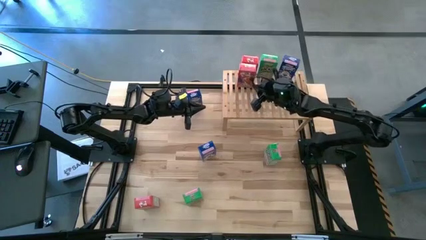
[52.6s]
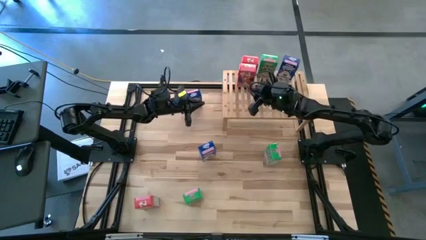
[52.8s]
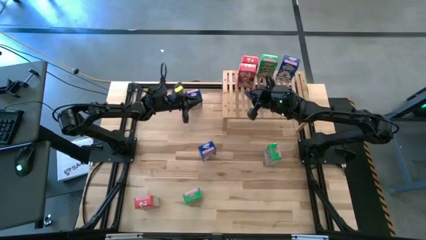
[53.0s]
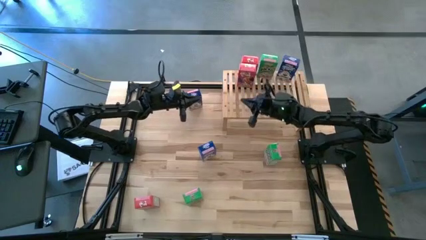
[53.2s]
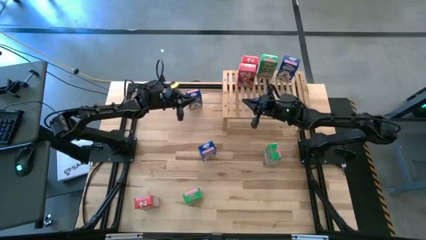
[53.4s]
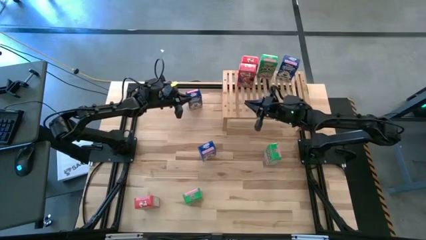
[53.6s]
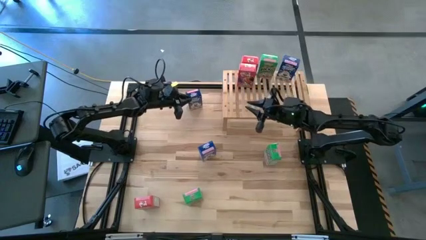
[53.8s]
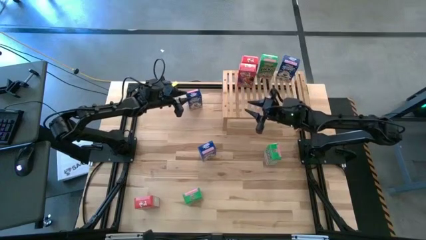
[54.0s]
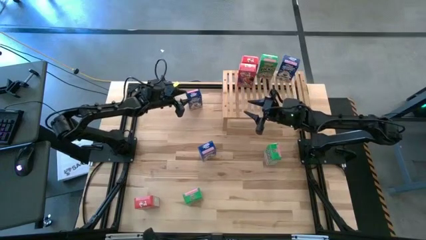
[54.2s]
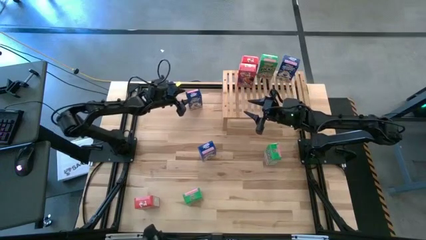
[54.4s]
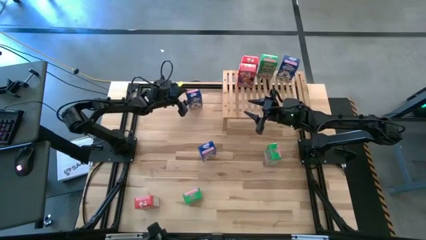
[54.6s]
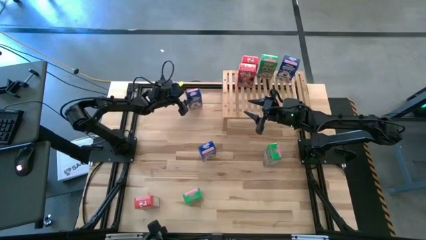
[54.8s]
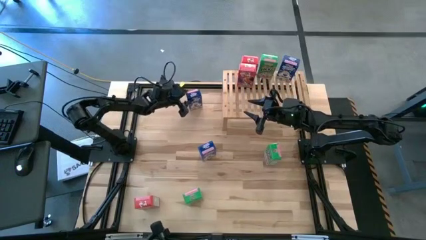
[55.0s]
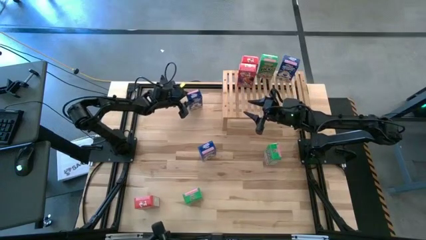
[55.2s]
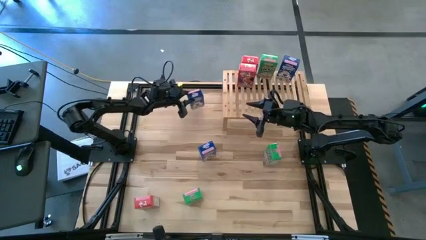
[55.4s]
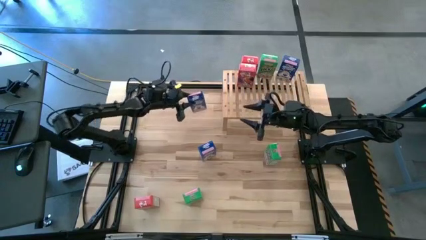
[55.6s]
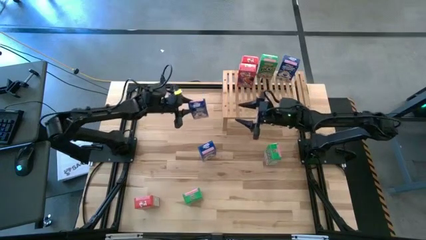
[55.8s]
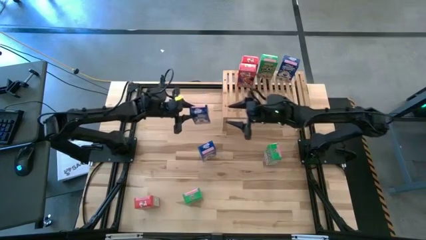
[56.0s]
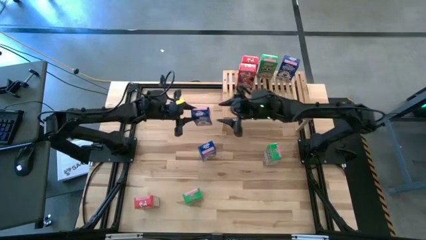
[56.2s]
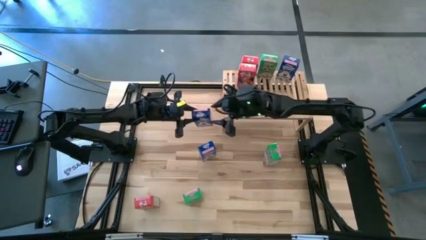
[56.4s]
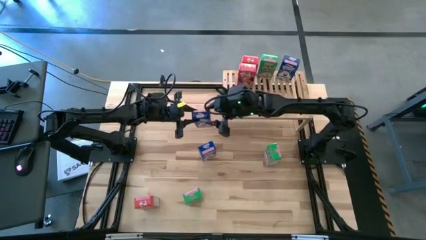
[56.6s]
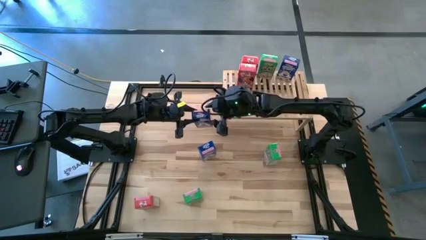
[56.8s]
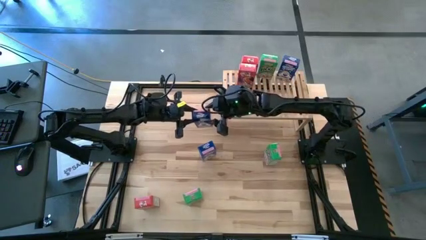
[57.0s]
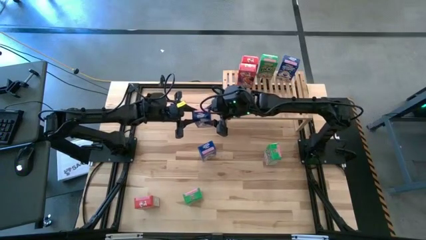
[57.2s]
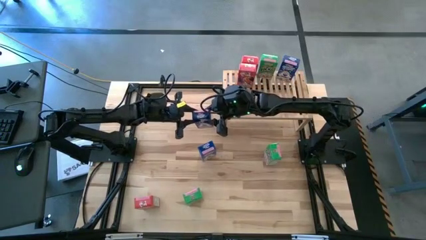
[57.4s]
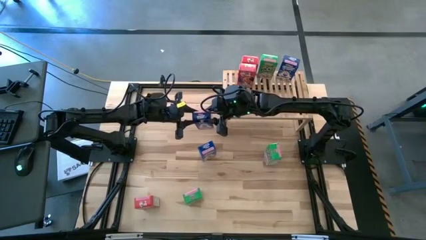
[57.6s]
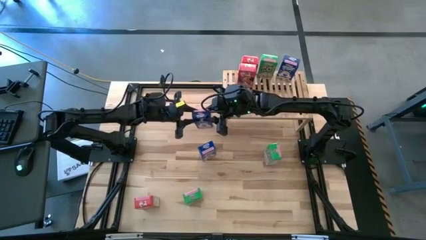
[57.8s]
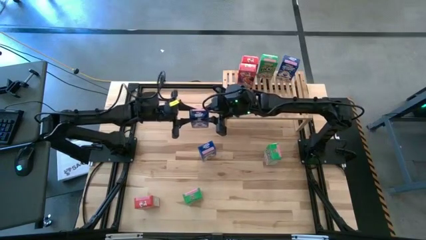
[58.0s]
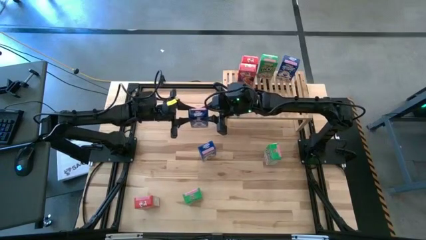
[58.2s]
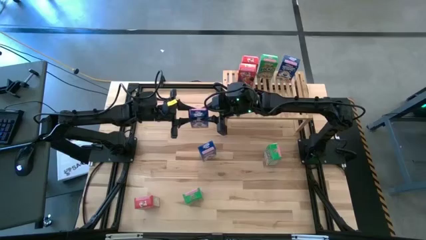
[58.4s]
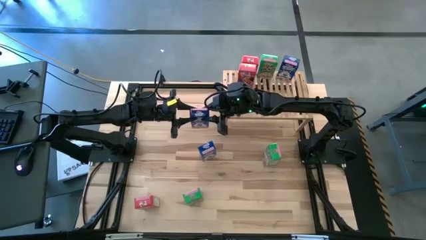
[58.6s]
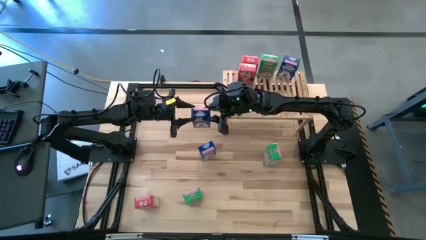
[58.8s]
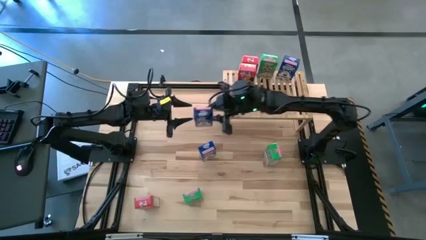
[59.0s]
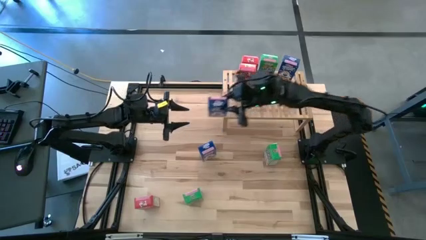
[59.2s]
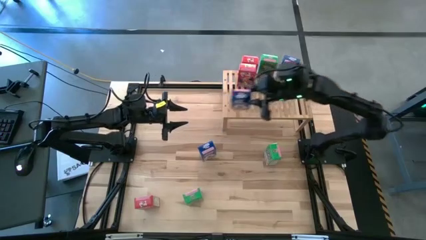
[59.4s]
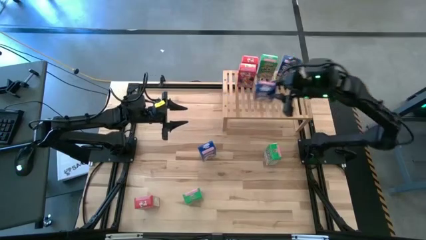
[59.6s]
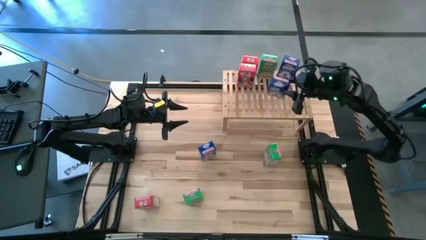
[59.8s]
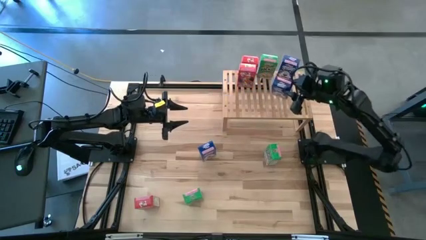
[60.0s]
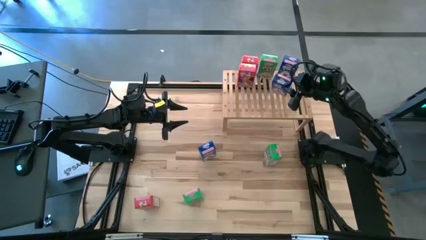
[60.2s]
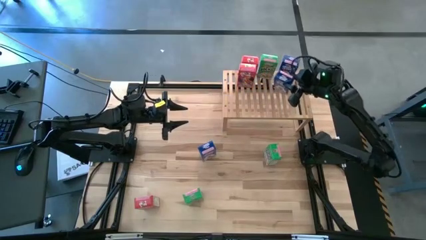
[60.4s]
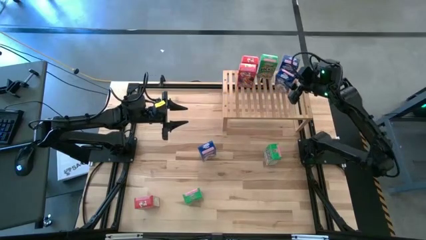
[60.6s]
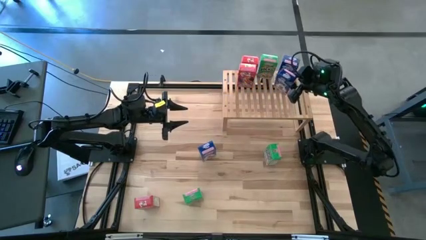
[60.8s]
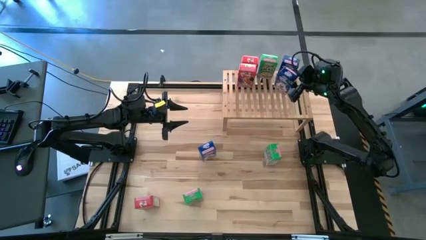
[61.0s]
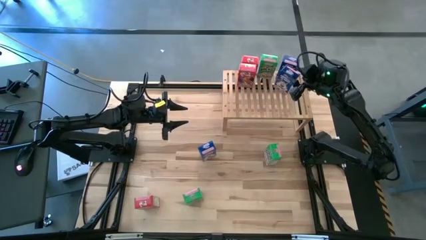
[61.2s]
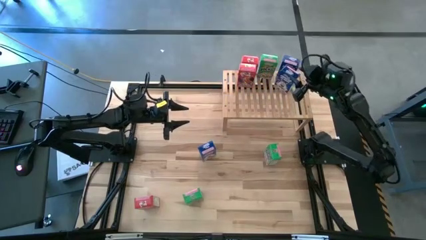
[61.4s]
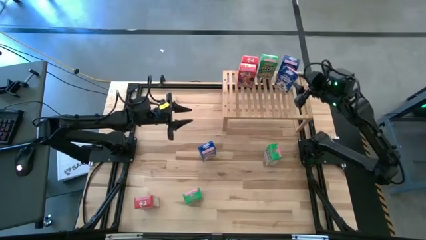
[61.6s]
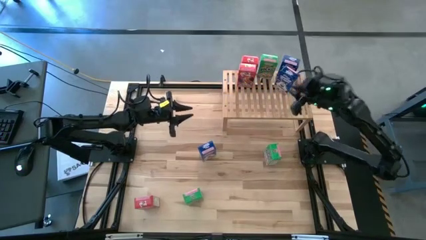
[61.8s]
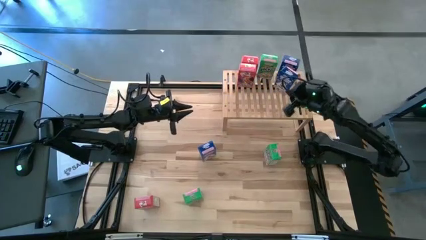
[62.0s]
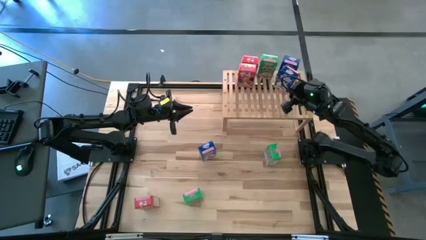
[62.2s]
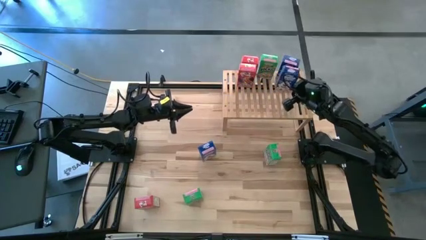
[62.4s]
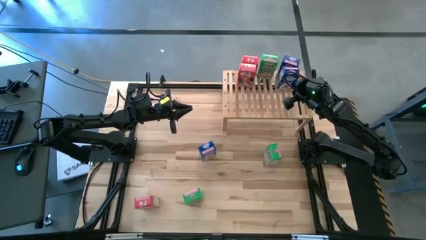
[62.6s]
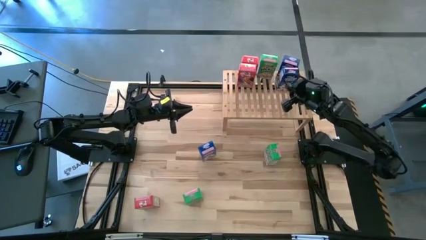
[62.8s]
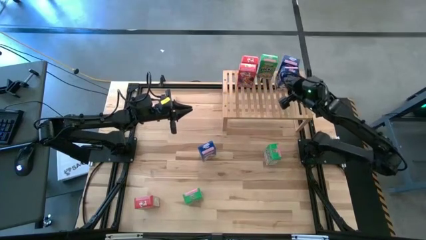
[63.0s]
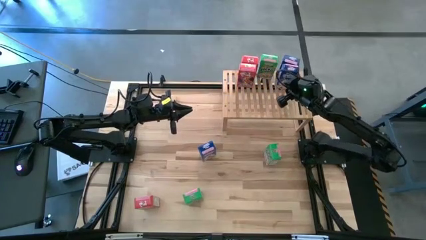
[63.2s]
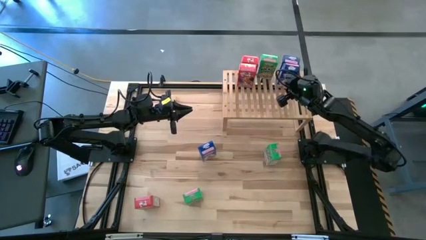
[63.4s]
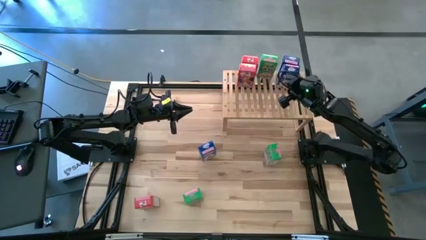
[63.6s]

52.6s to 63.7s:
Task: Stack cereal on shelf
Put the top blue cereal box on the shelf aligned with other blue cereal box

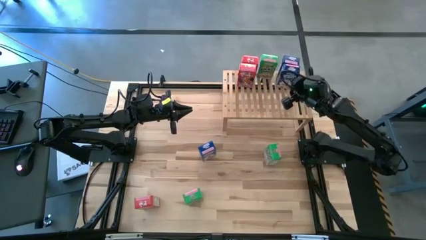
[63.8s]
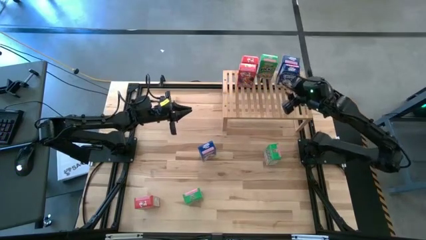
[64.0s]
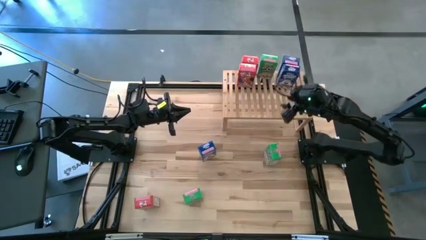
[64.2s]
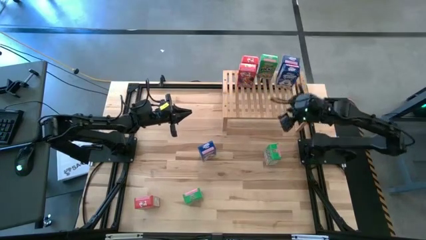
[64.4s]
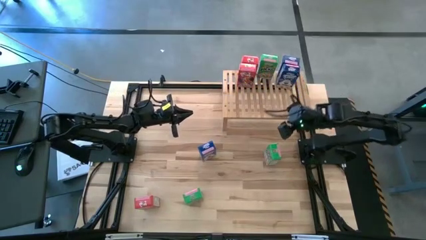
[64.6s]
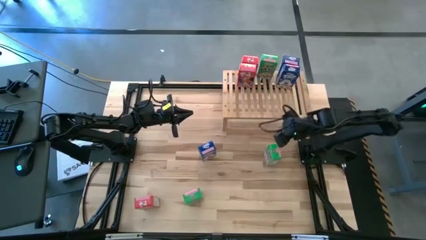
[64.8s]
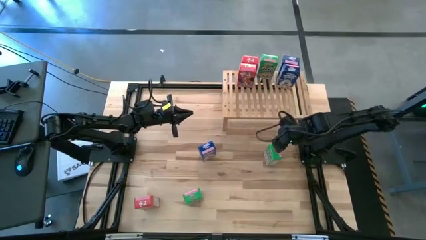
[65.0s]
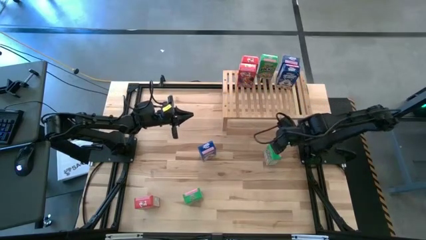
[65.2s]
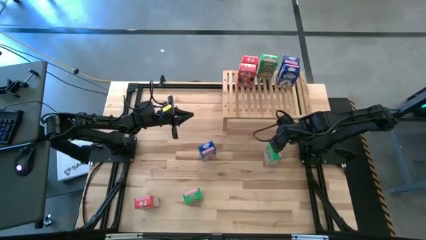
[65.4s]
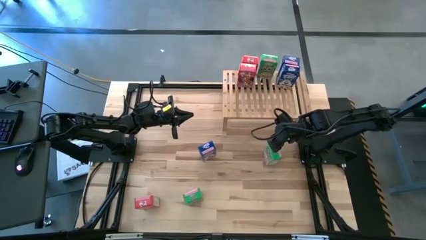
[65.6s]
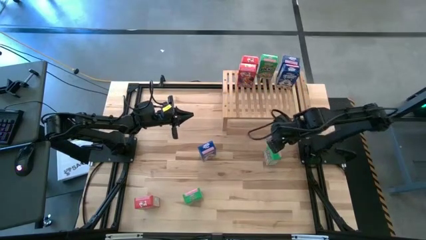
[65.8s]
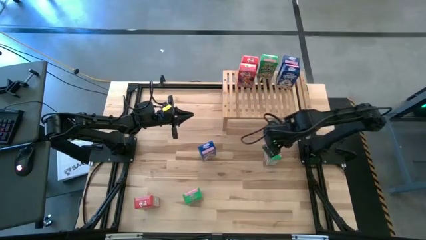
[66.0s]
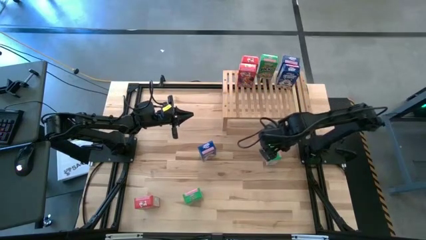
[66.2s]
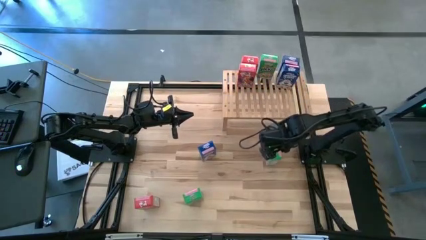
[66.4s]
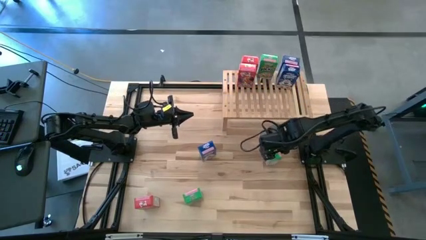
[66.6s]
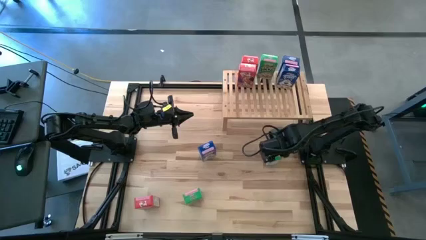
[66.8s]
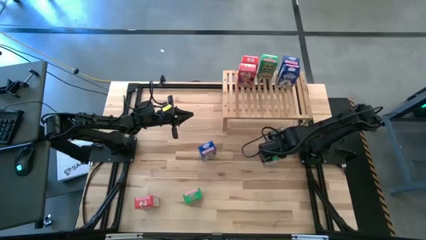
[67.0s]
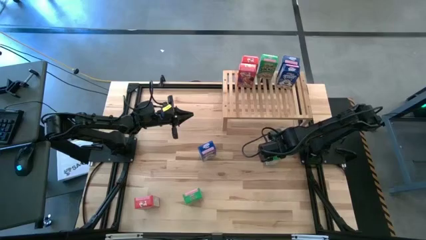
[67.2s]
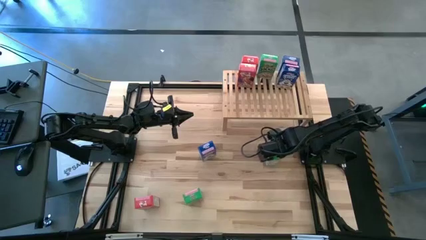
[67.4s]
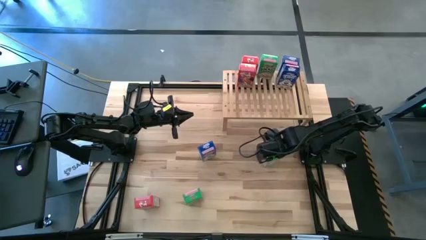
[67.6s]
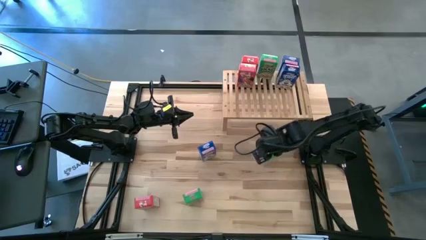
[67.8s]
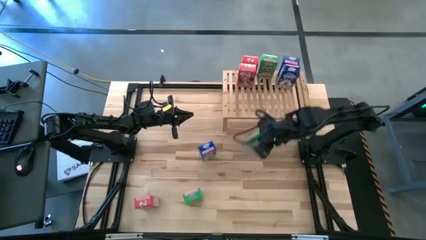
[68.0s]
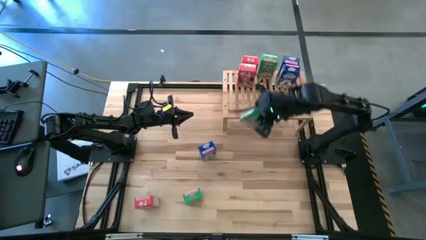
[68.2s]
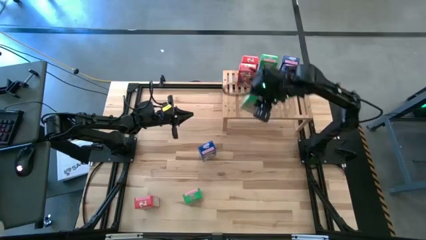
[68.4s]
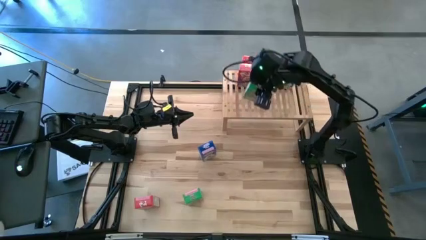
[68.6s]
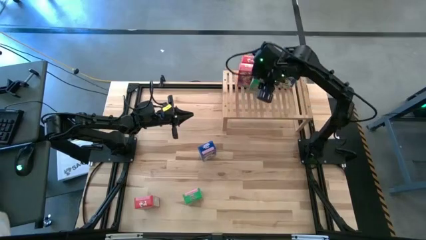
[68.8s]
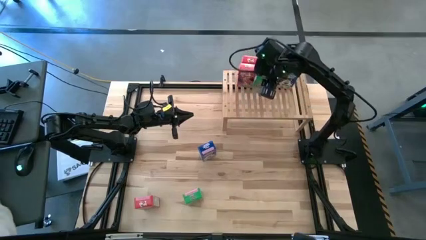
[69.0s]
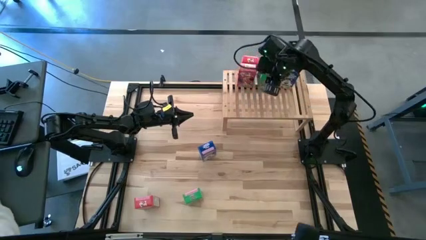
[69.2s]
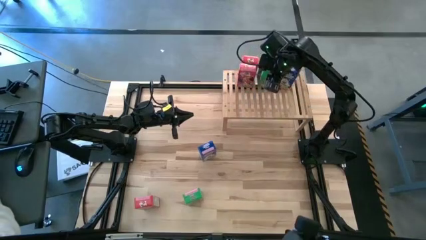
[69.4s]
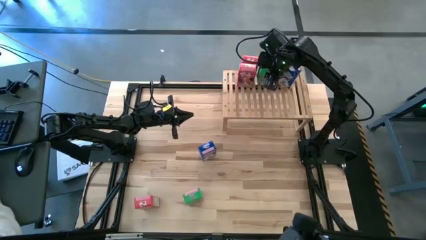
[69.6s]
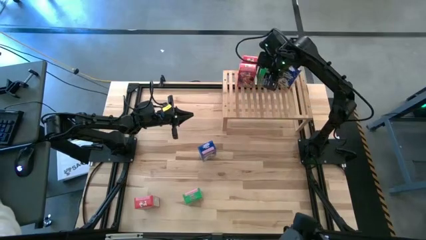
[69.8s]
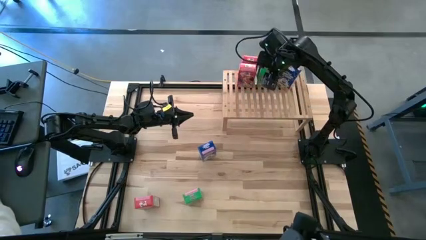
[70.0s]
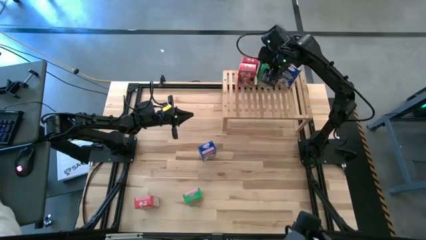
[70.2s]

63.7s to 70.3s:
Put the right green cereal box on the shelf aligned with other green cereal box
